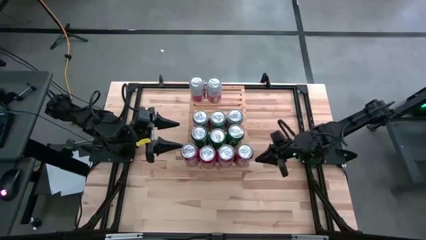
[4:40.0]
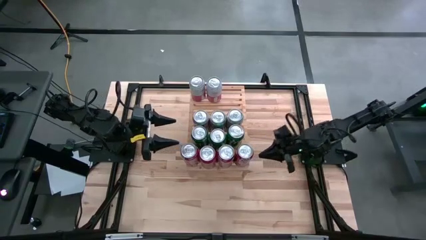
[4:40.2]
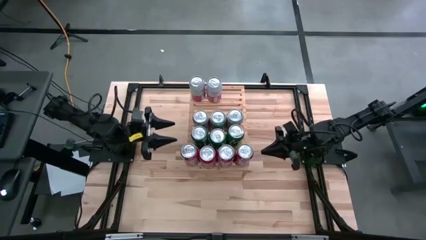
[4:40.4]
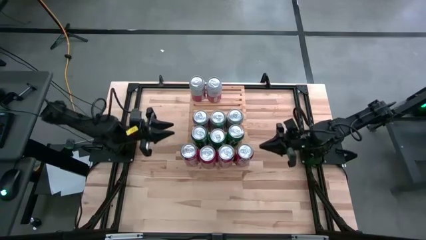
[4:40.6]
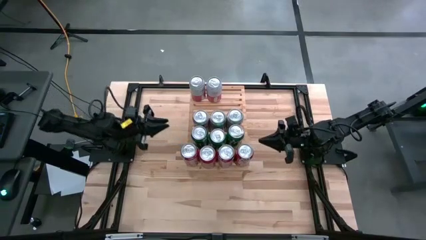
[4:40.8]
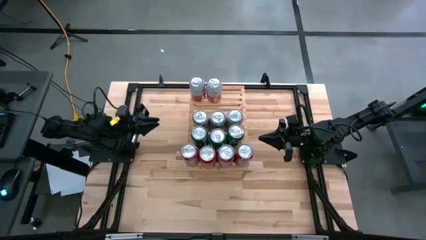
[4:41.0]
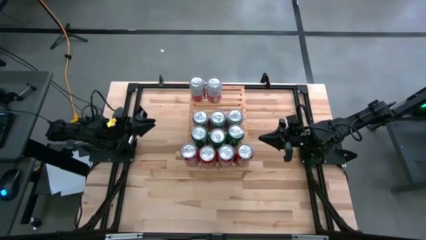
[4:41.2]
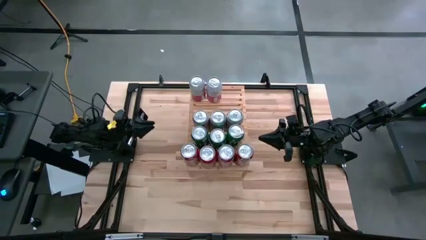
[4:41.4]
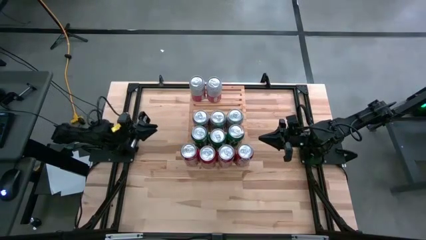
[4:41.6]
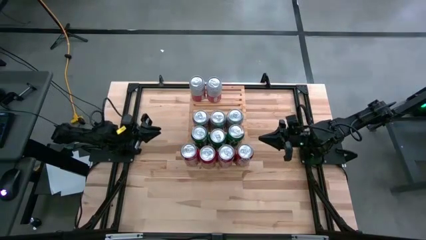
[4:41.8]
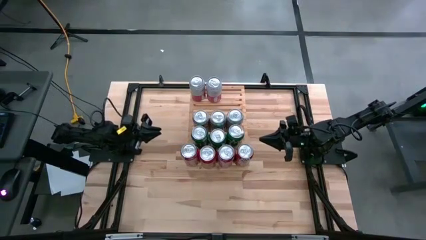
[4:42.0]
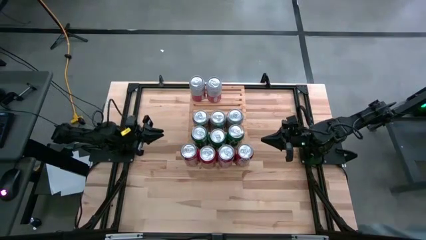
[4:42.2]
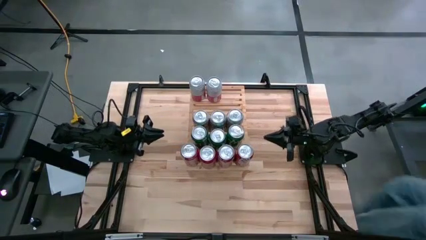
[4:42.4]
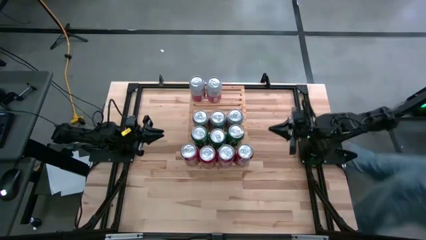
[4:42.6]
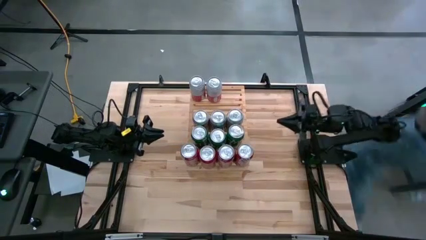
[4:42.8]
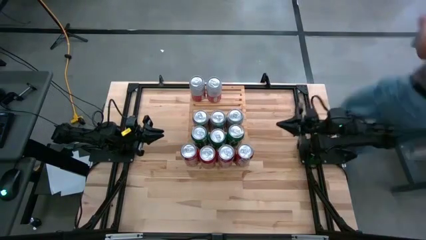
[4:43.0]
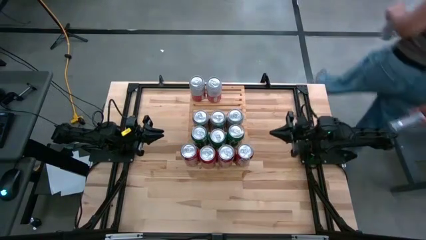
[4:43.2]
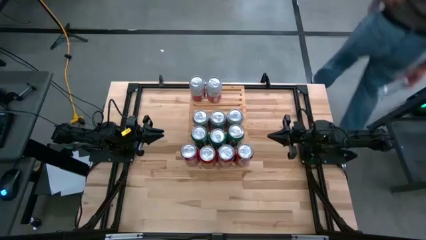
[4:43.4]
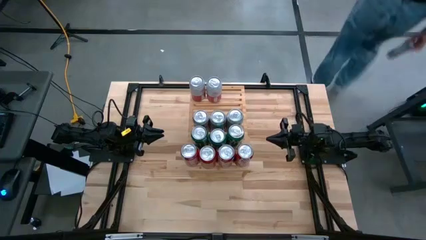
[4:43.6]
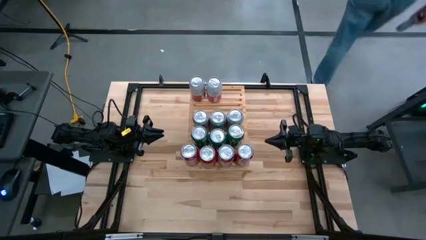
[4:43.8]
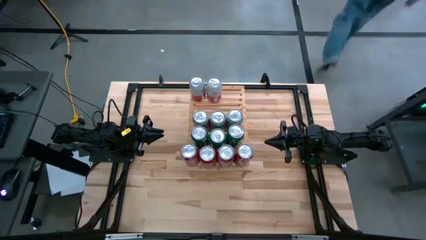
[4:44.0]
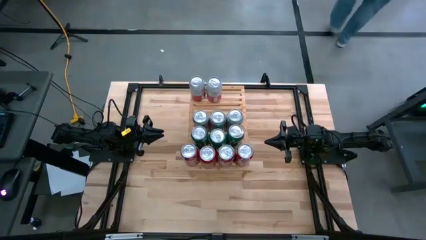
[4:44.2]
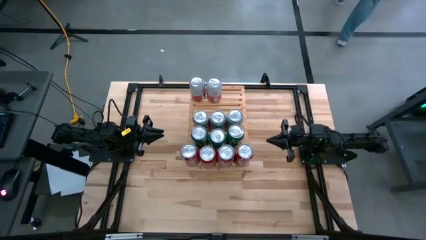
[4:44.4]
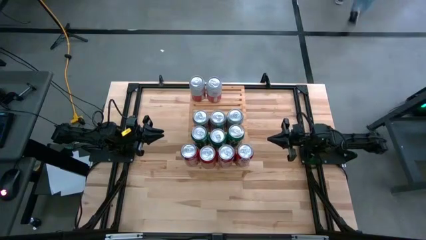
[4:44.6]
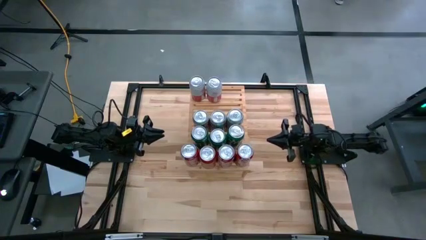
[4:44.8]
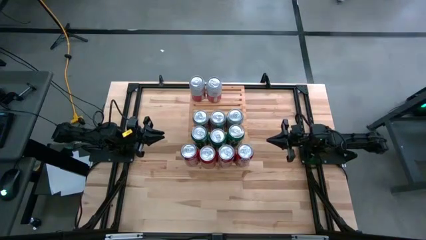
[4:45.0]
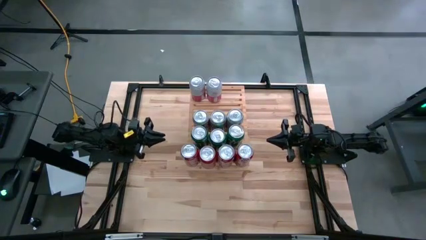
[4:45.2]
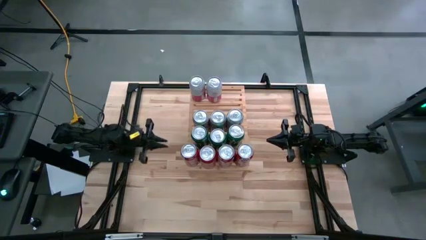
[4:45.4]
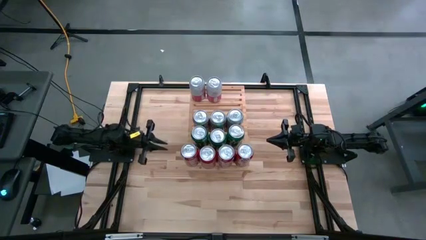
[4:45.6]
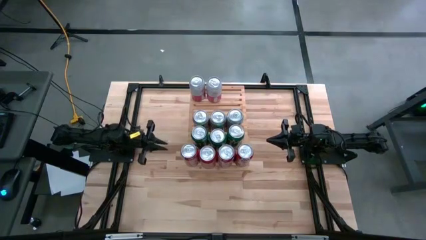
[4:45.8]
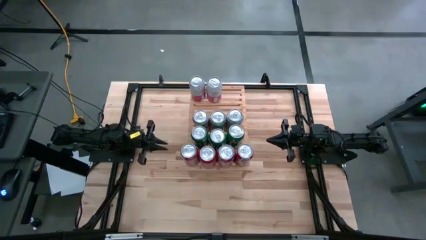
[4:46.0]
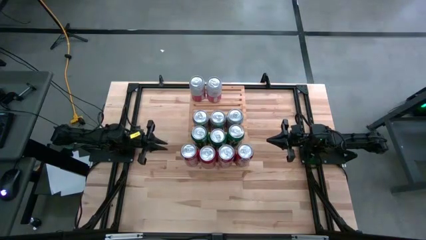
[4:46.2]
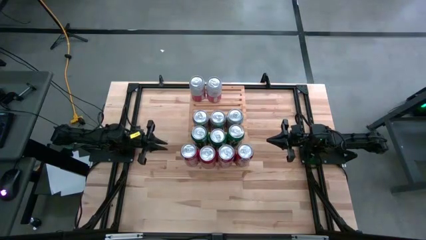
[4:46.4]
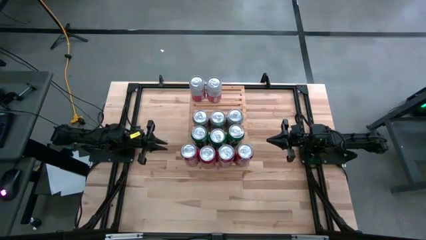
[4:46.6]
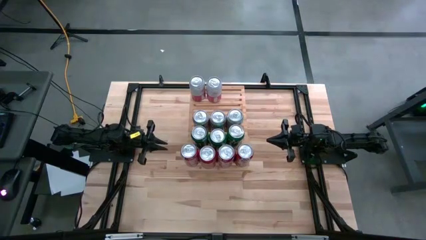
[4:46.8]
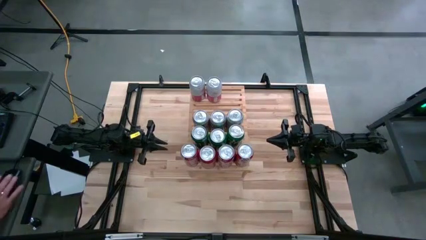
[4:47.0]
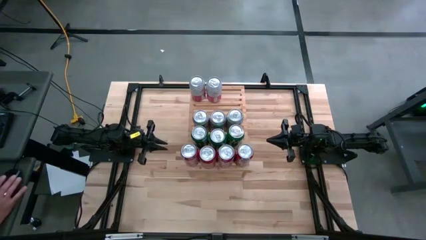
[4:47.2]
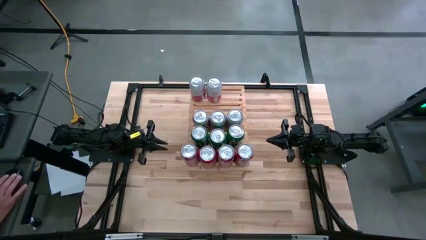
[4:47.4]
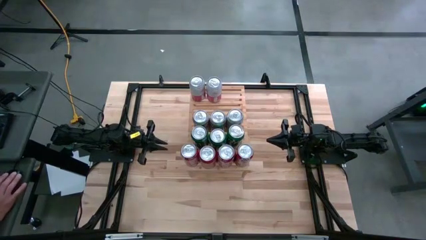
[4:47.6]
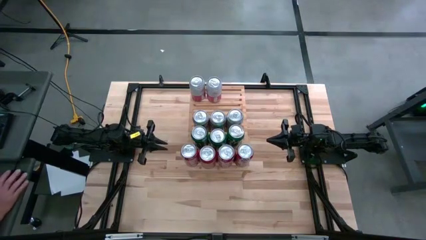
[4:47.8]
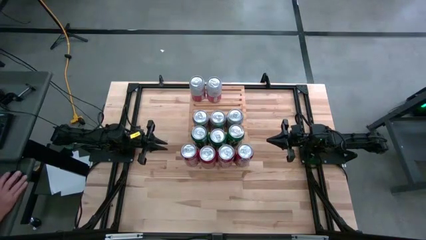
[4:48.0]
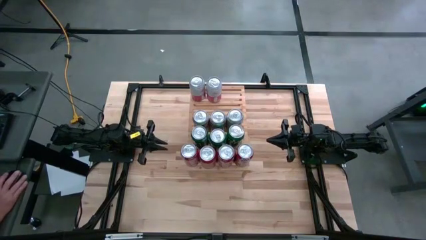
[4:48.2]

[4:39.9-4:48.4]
Task: Place canned beverage on shelf
Return to Home Position

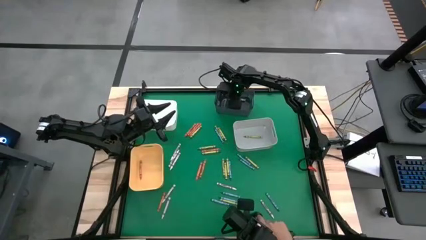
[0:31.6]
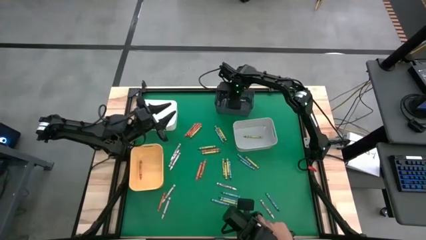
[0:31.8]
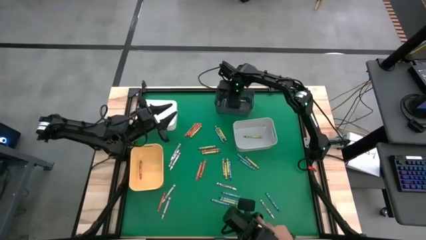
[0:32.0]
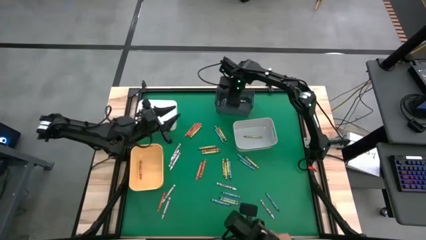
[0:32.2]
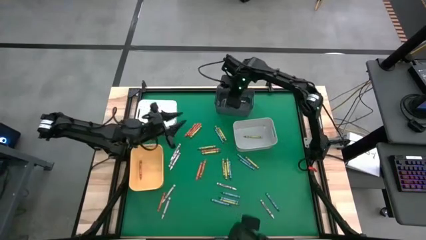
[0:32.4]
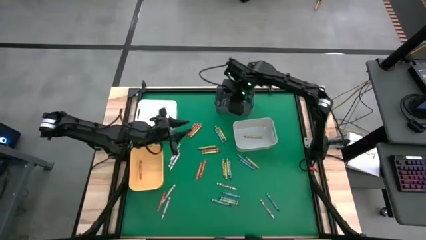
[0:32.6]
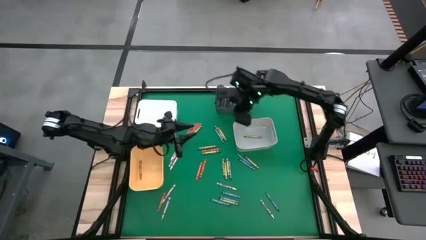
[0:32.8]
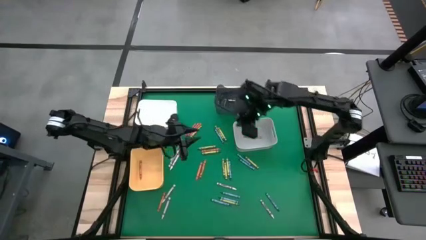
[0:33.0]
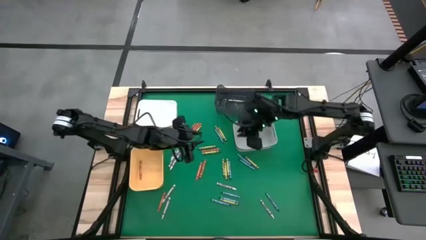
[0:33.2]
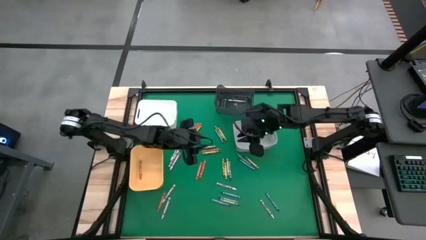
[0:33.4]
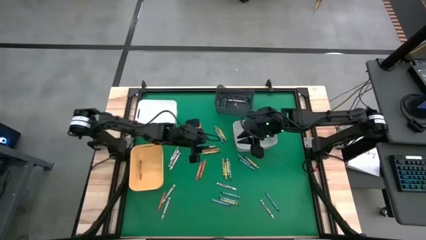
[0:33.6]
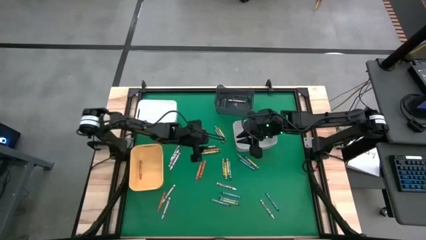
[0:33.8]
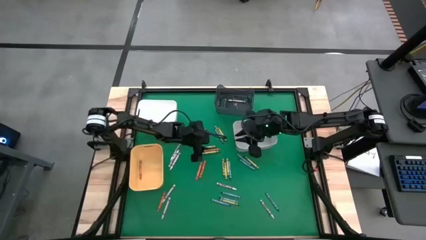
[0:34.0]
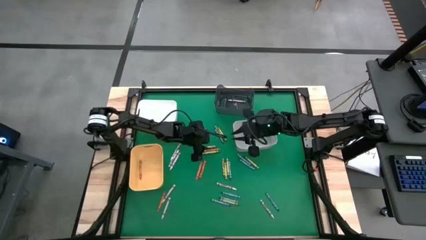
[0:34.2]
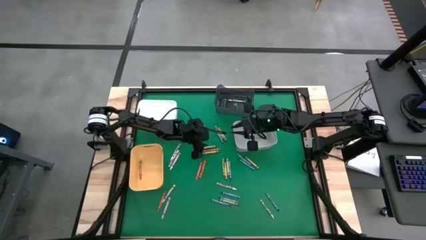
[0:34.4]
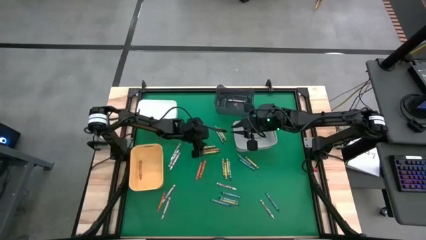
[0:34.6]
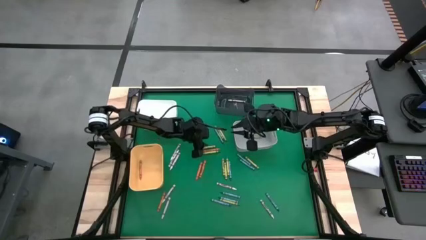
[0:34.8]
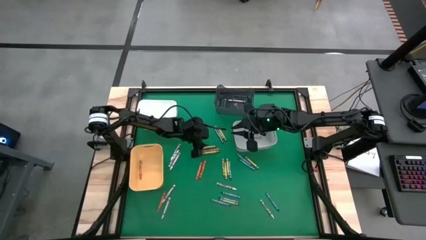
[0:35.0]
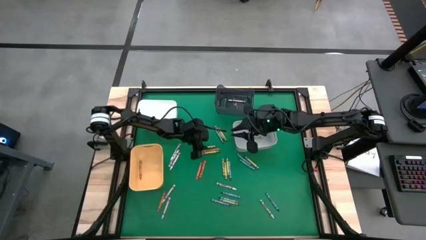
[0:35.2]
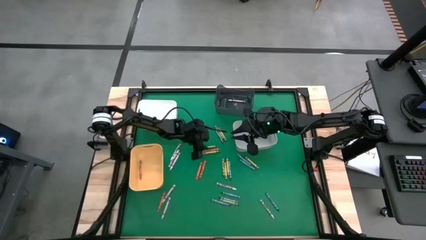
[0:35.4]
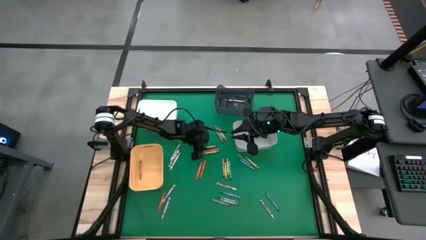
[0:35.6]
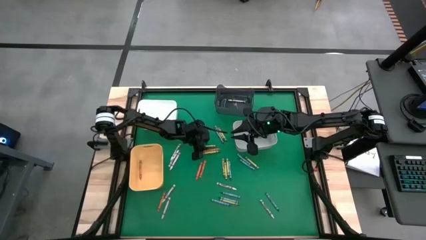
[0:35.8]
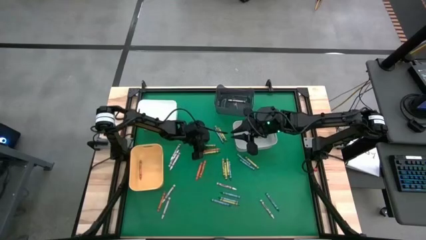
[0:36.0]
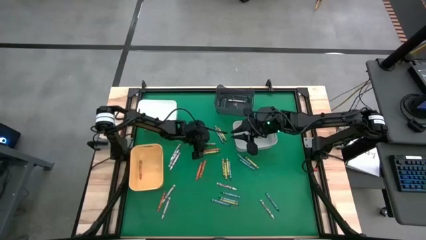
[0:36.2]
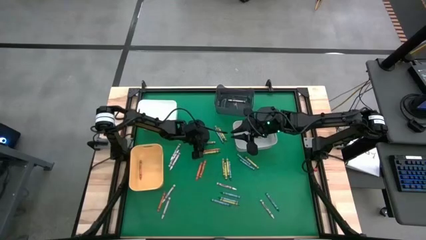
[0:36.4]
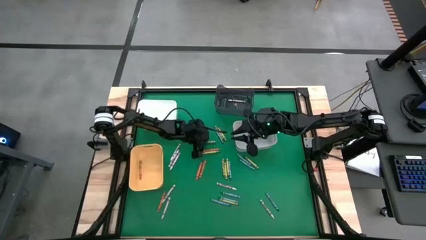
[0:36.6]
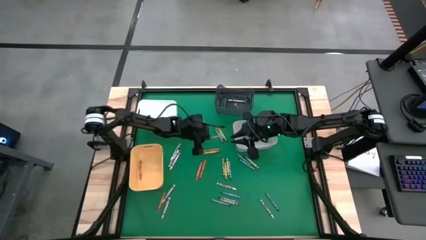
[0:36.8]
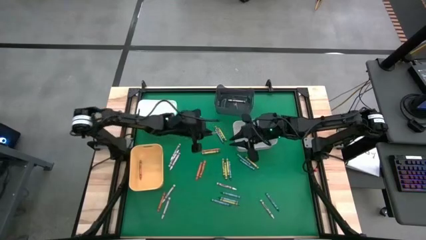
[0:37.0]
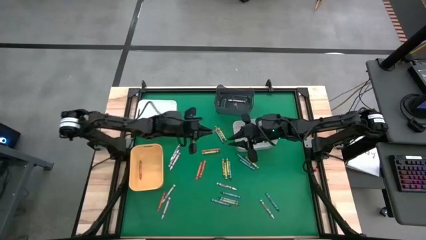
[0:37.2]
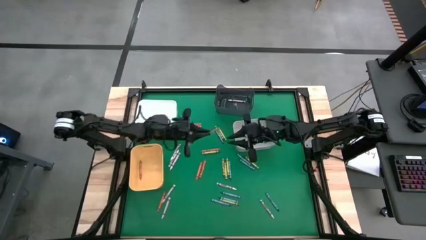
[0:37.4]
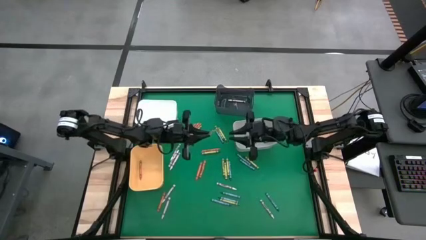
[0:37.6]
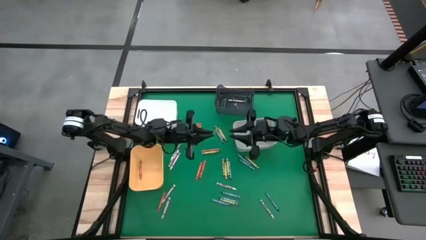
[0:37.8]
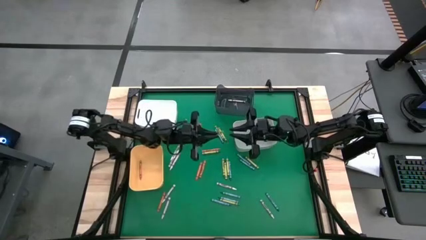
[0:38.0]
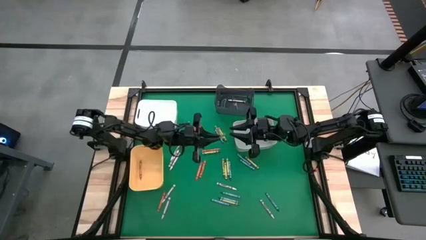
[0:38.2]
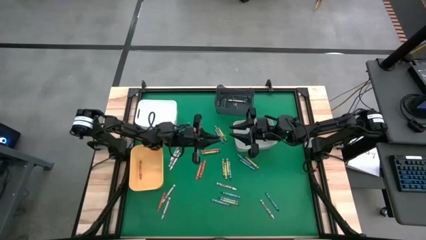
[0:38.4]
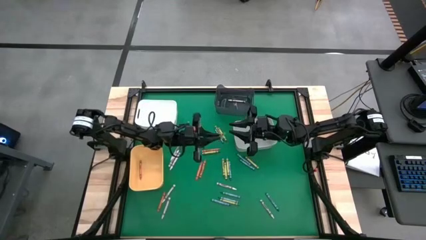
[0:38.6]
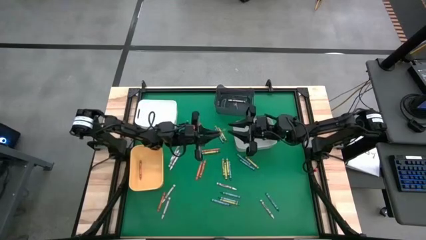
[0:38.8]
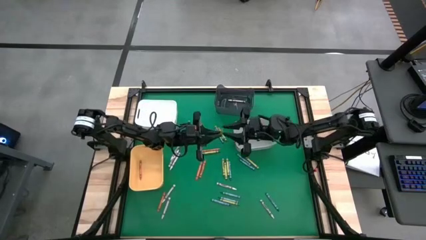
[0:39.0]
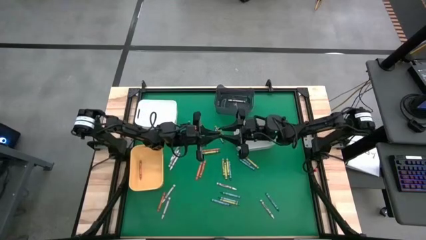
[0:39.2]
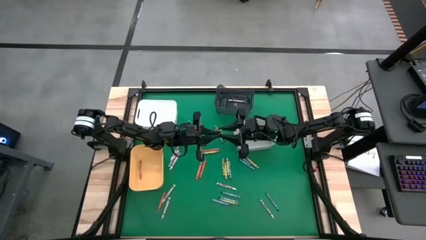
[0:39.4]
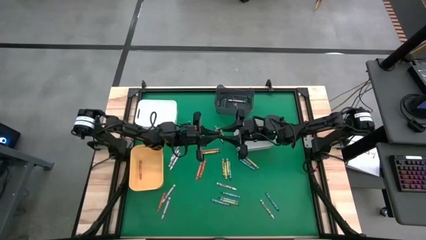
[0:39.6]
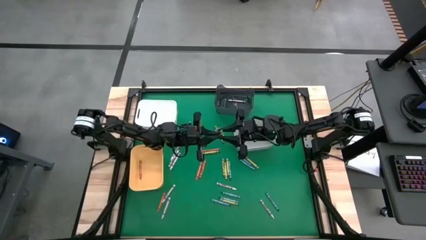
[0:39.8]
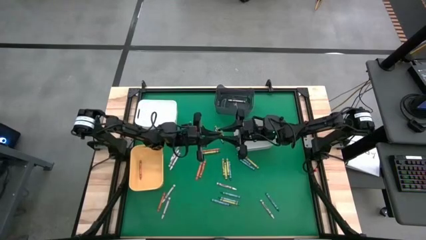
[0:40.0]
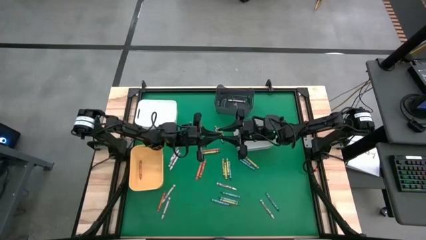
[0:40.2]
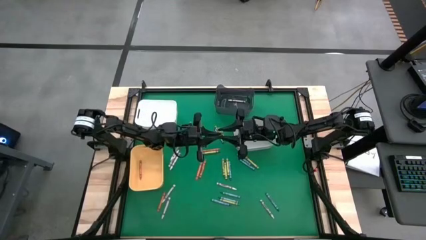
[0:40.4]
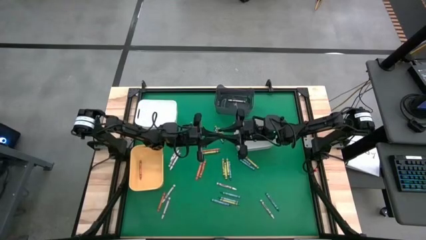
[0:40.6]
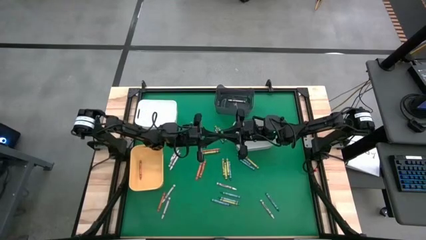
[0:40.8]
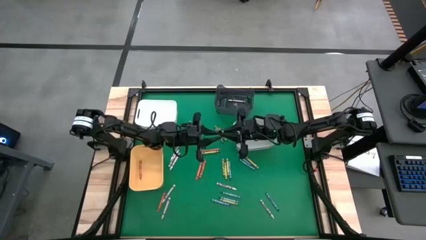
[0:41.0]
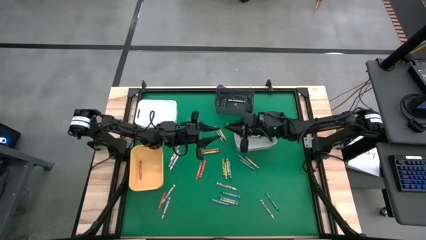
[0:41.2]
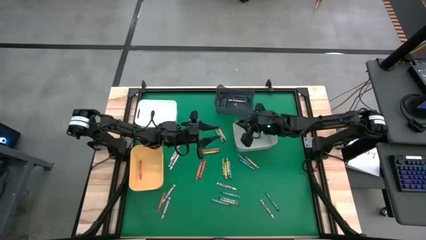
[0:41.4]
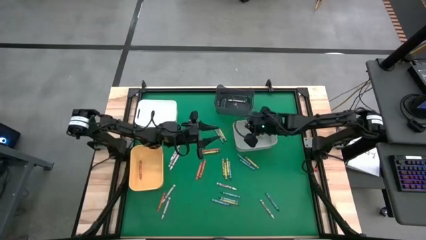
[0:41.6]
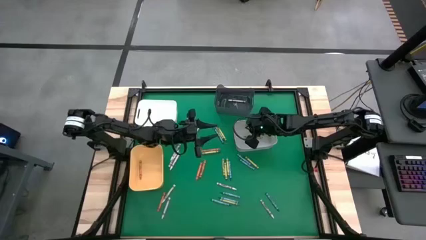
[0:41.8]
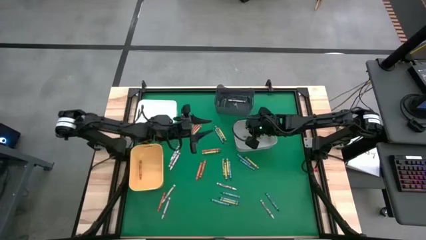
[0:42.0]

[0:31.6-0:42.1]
Task: Sort crayons
Put the green crayon into the gray bin
